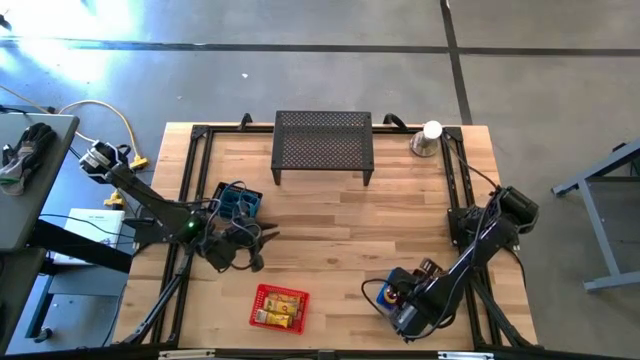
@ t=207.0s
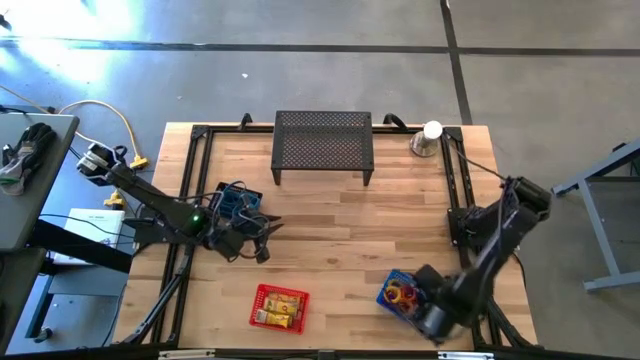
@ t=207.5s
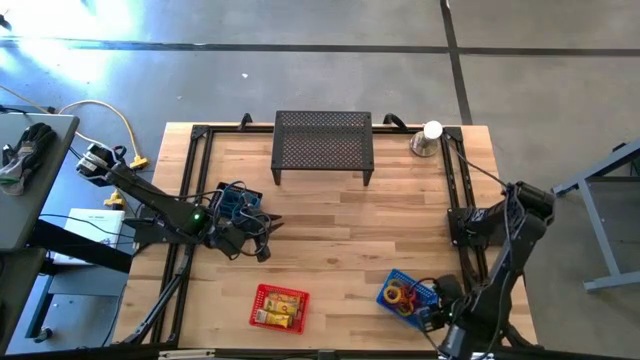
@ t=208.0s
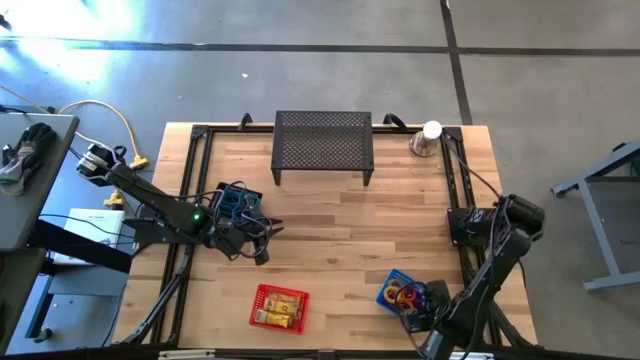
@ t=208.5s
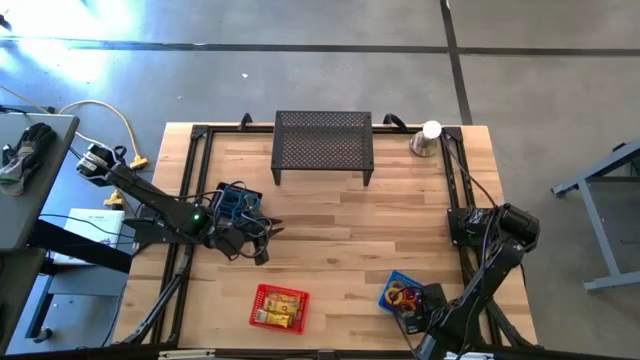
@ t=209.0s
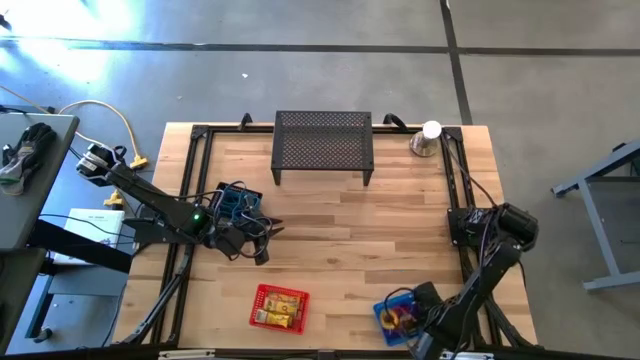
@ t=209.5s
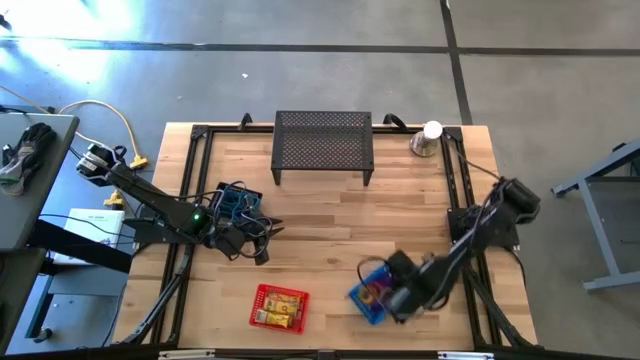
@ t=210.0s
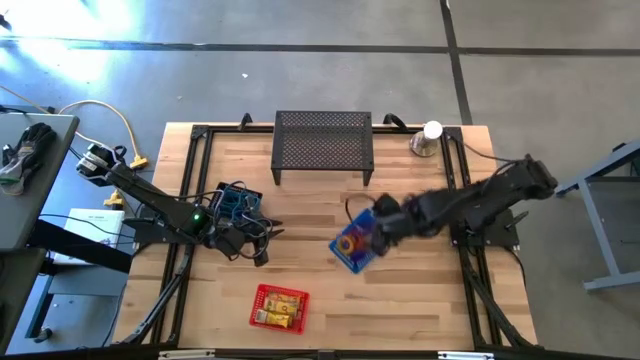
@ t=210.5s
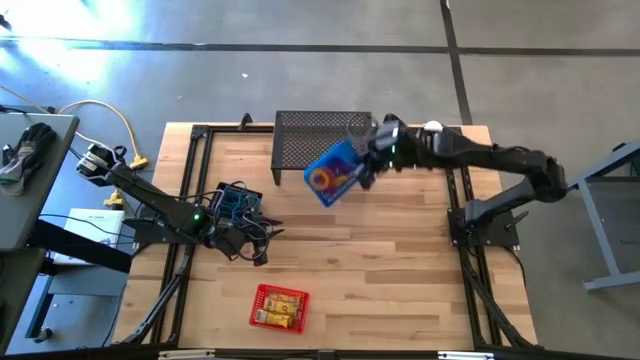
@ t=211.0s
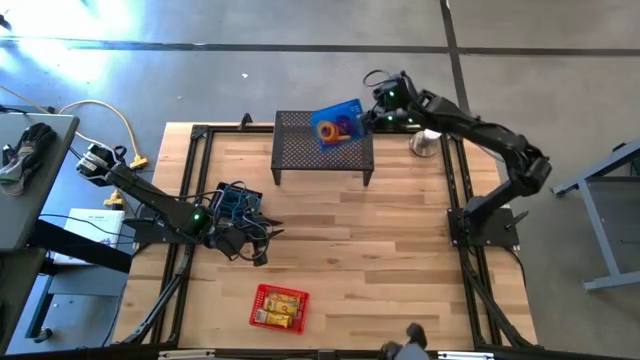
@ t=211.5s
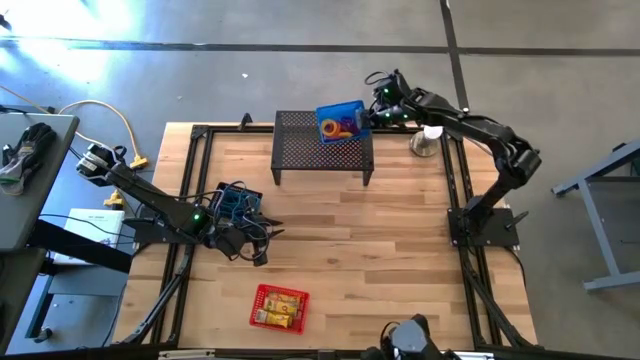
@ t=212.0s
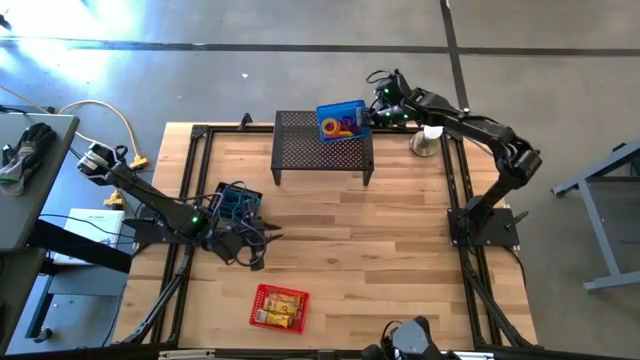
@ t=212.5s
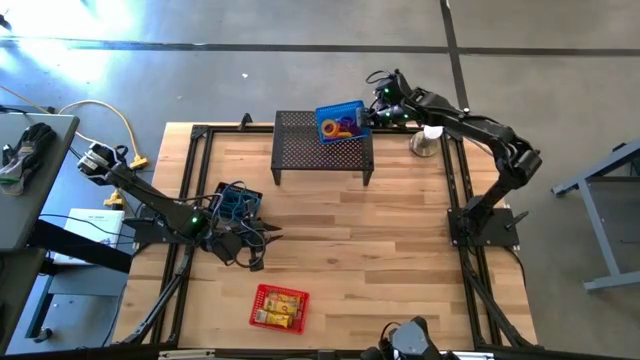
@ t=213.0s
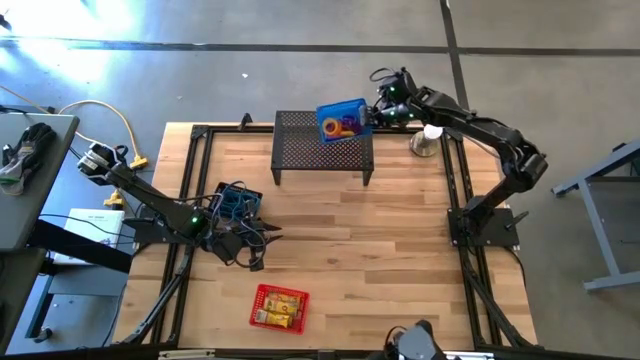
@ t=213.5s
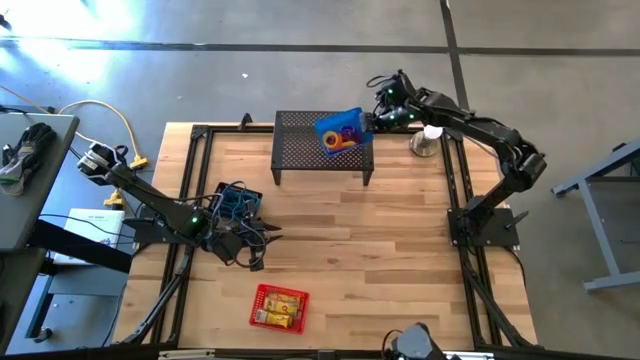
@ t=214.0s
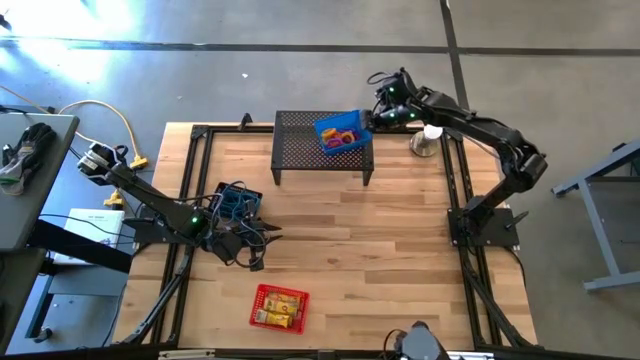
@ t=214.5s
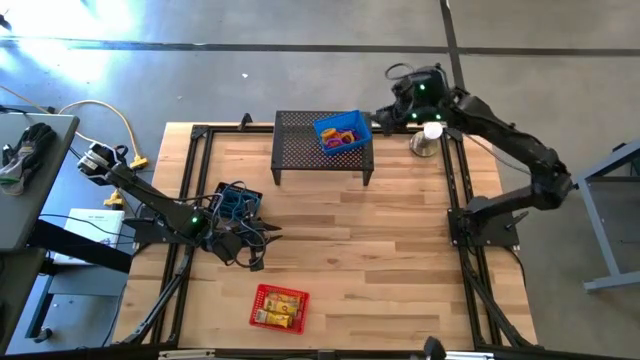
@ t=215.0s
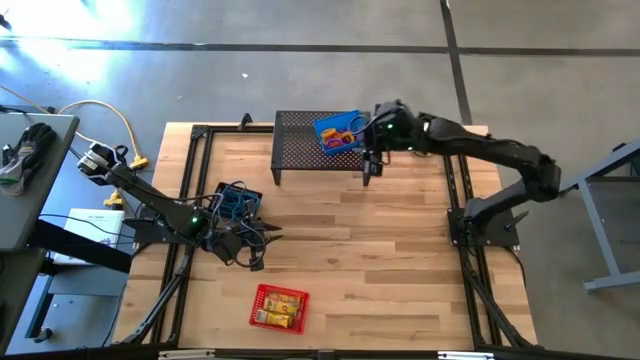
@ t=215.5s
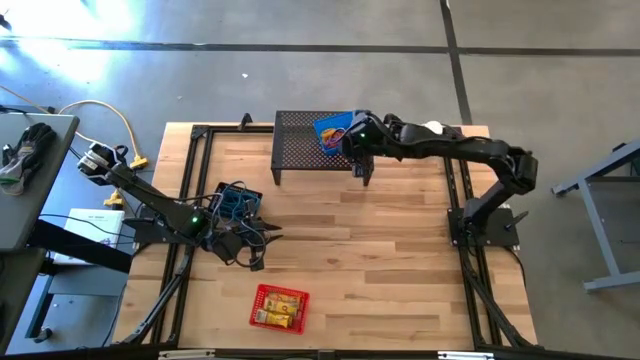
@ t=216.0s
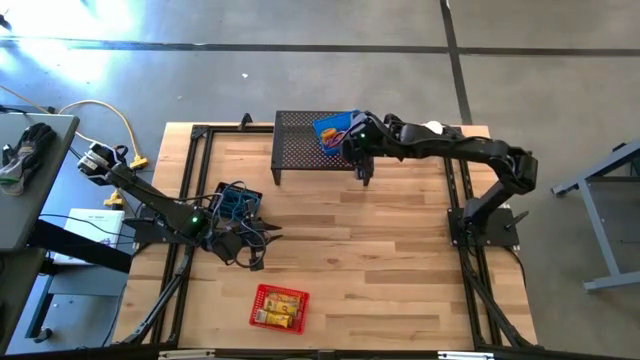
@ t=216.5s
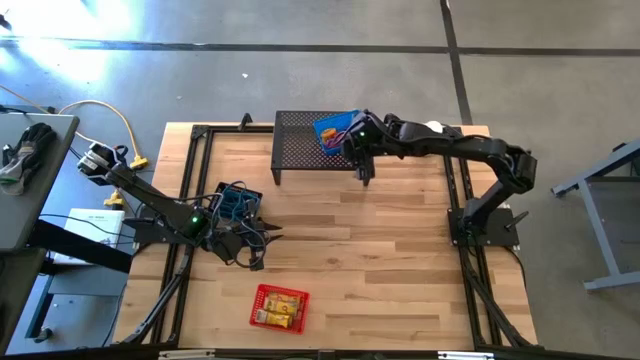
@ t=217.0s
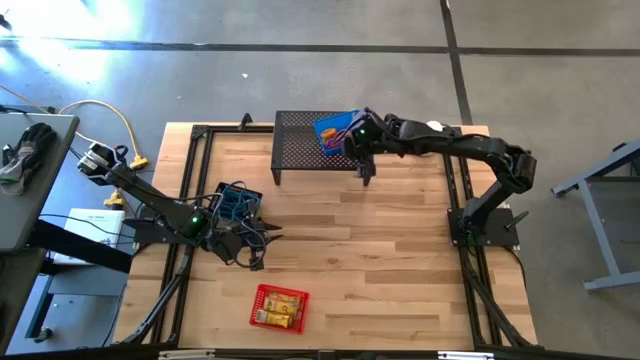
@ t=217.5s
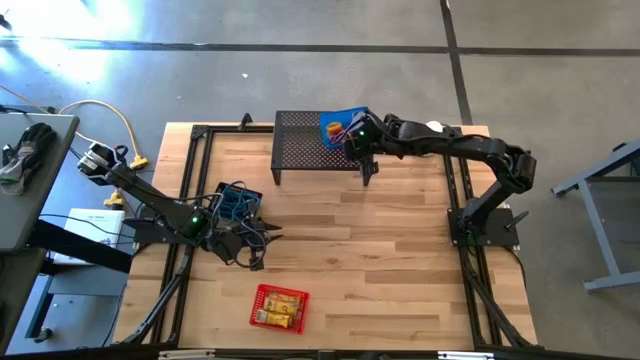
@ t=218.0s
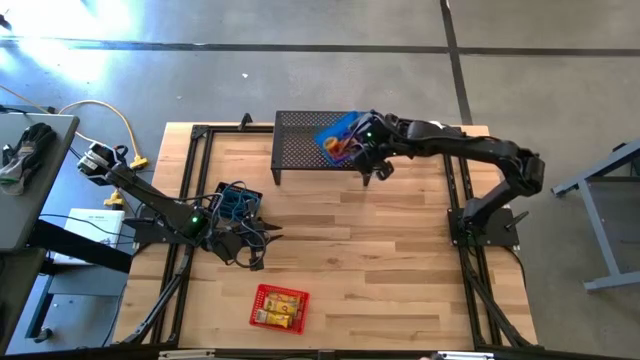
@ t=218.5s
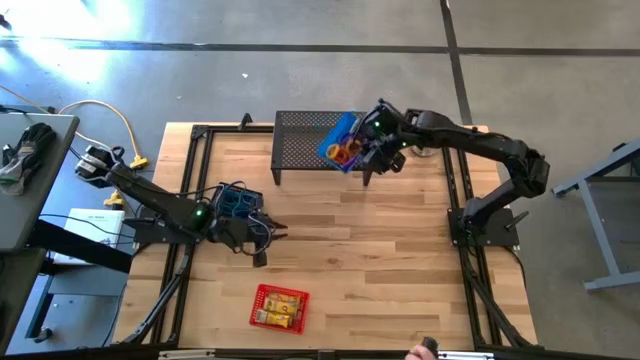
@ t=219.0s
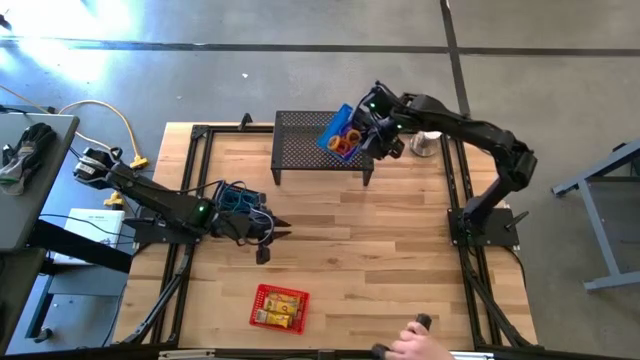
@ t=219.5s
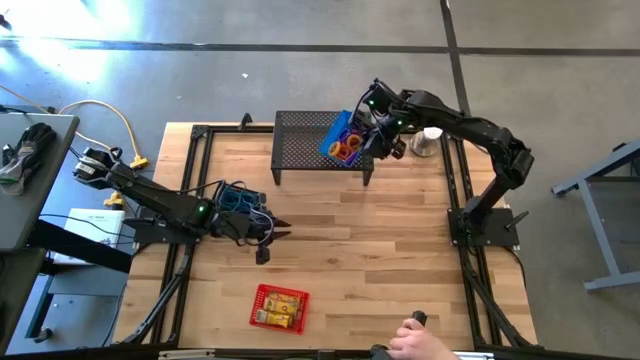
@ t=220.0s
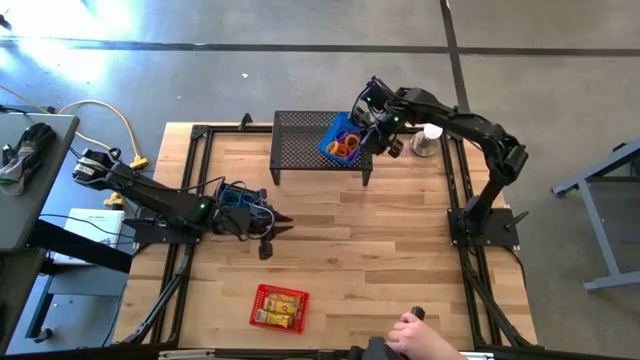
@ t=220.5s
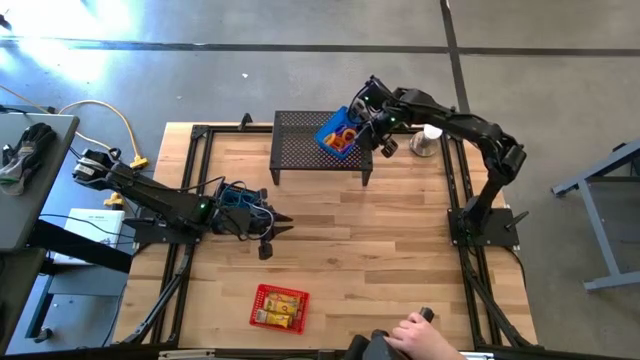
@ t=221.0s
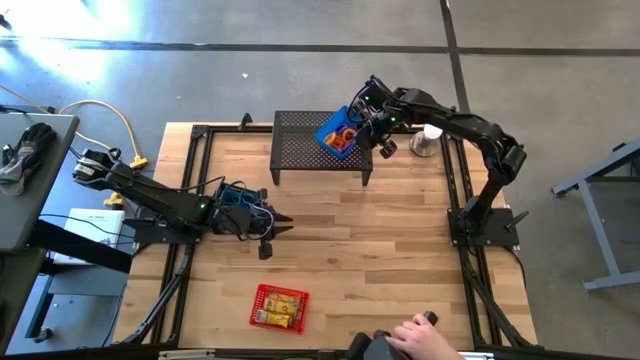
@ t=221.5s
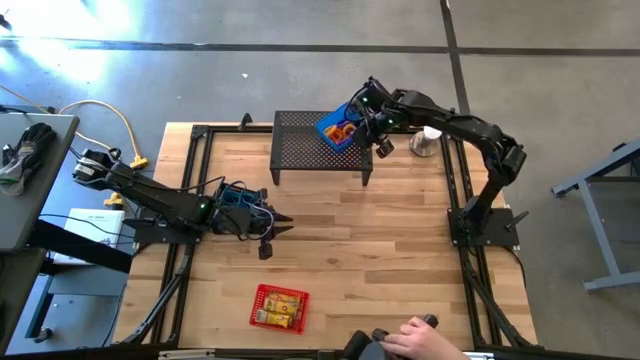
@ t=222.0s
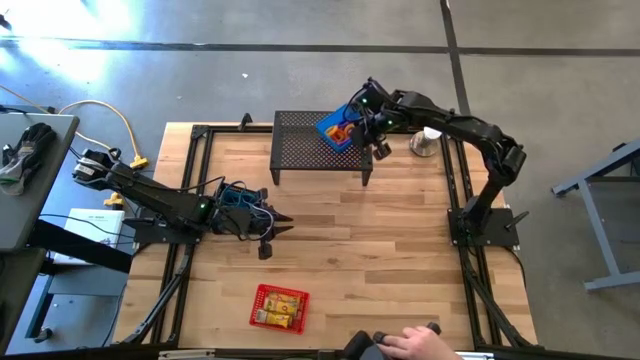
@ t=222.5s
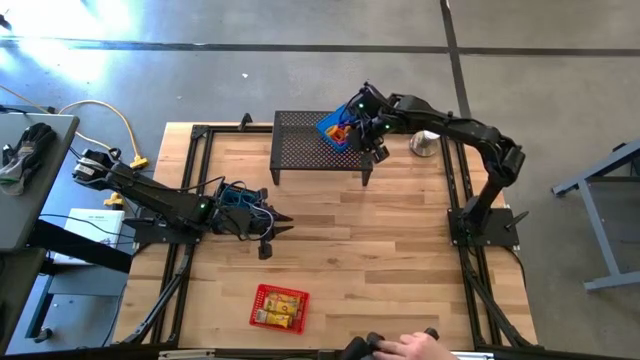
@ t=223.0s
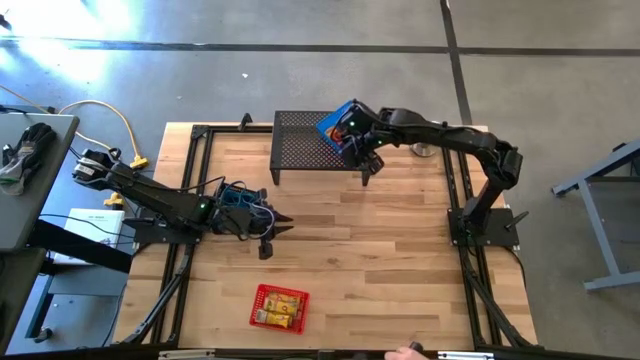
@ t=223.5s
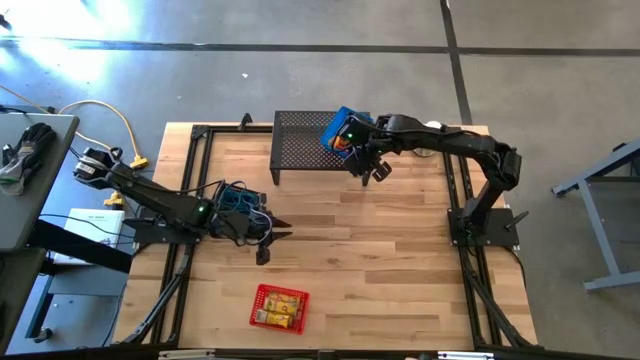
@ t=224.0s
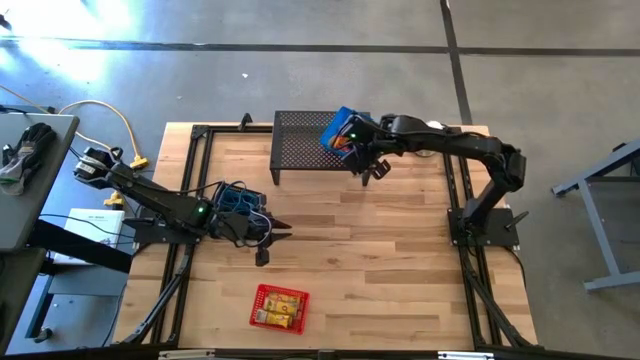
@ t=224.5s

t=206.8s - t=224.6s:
Task: Pick & Place Office Desk Supplies
Put the blue bin with spring keychains on the shelf

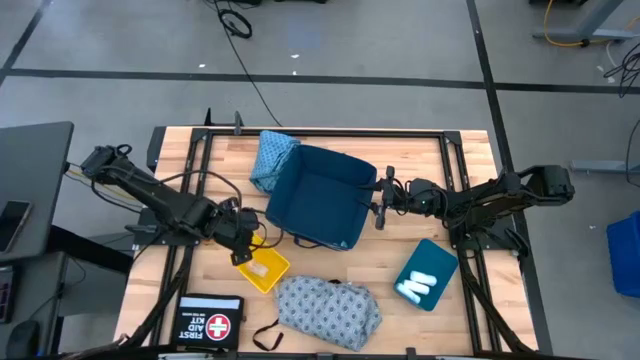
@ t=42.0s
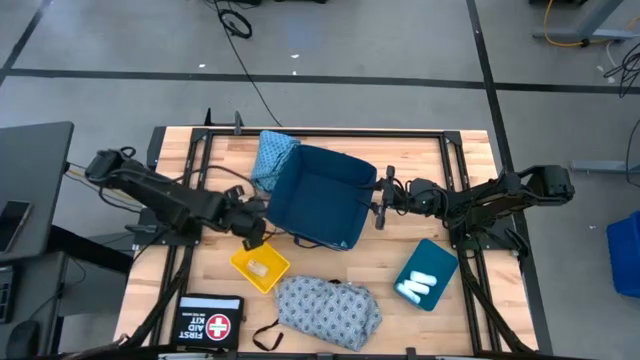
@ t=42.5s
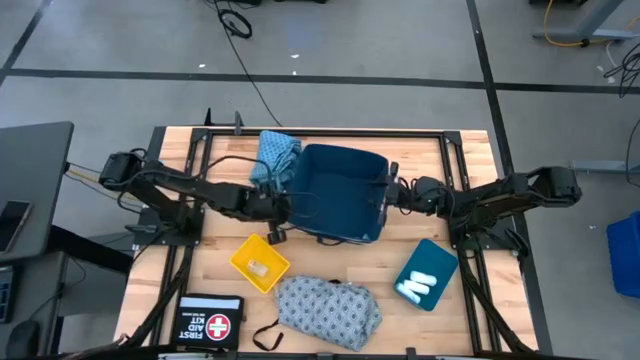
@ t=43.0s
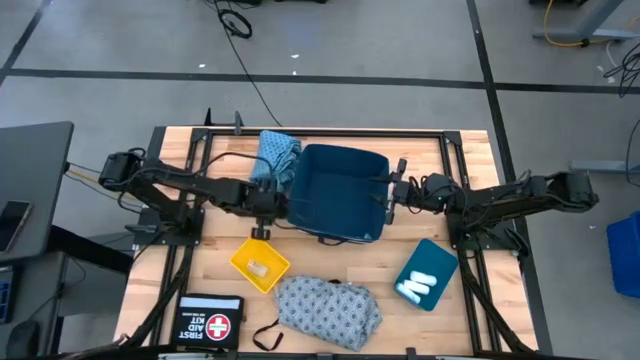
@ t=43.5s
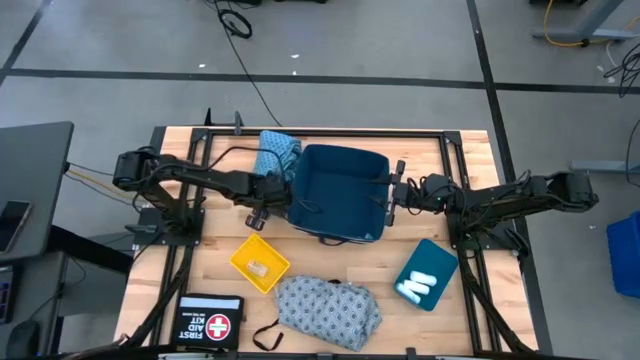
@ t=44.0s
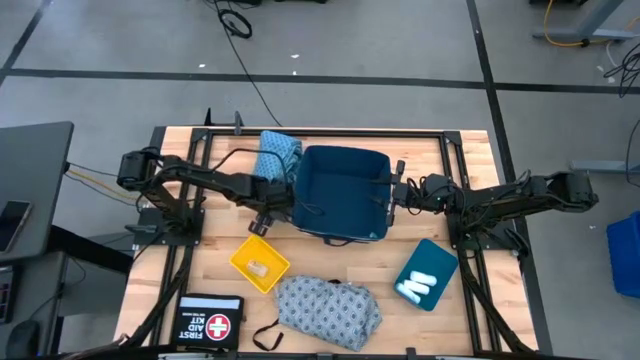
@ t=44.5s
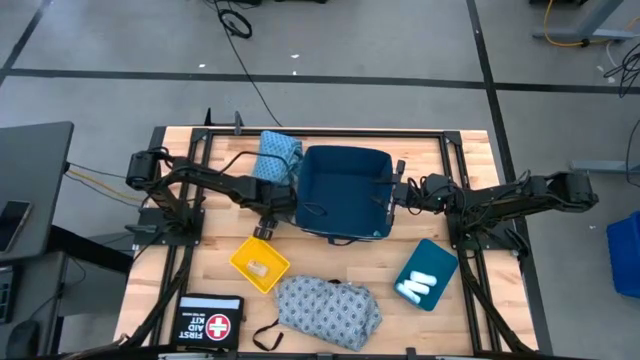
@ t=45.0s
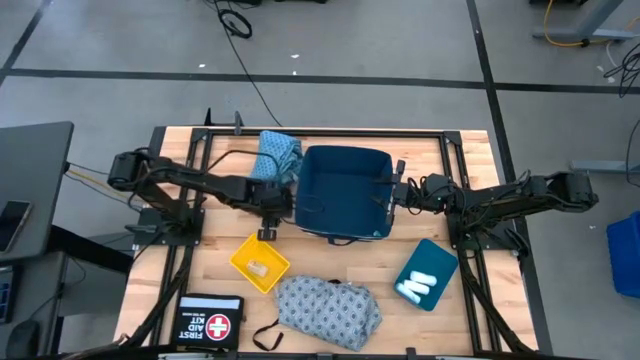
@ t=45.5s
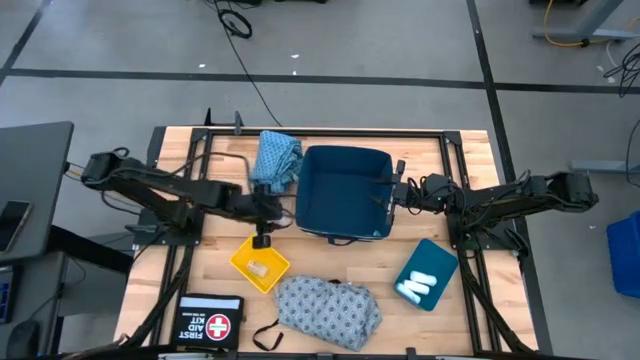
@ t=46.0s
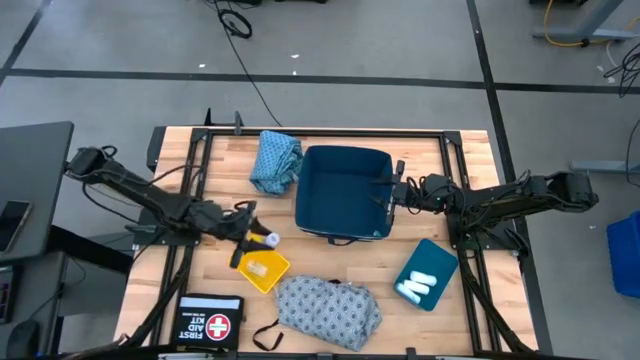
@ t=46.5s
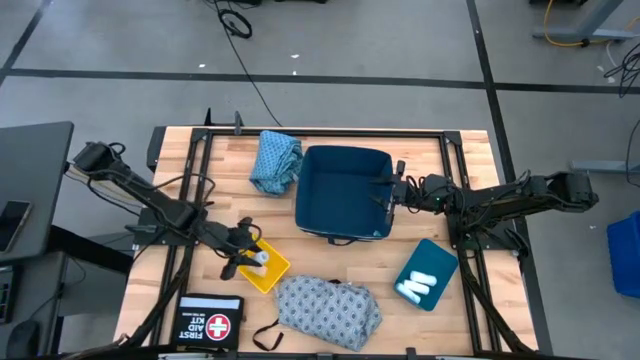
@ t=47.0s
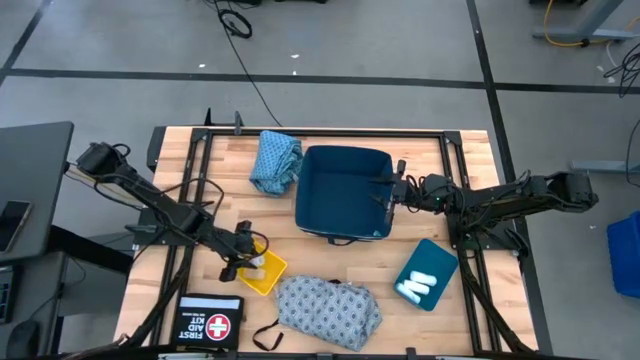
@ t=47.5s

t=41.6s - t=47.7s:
Task: Pick & place medical supplies in basket/bin
Put the top transparent pill bottle into the yellow bin
